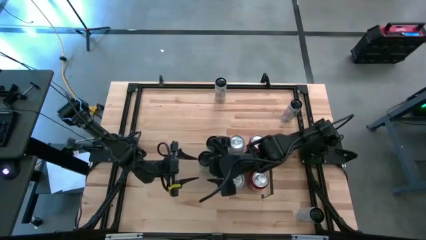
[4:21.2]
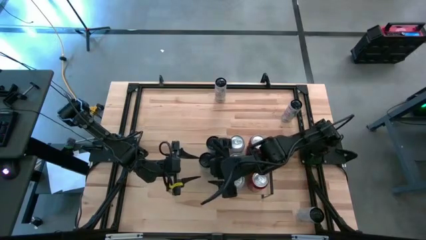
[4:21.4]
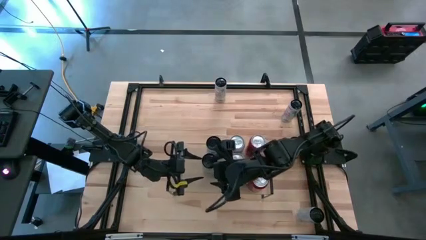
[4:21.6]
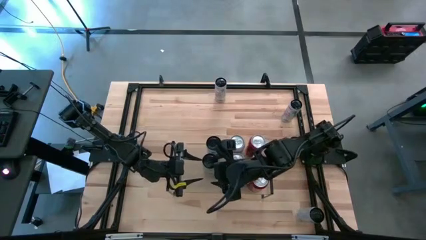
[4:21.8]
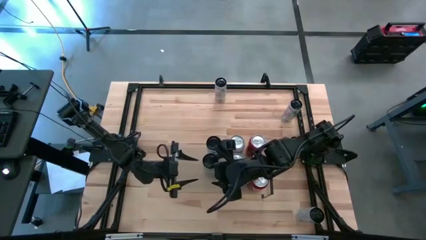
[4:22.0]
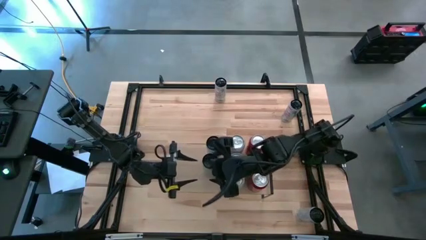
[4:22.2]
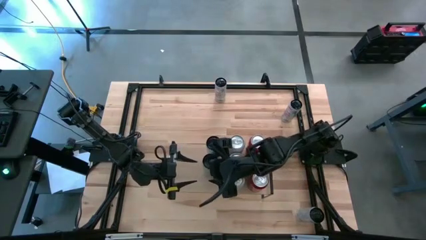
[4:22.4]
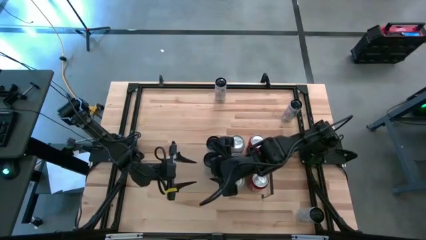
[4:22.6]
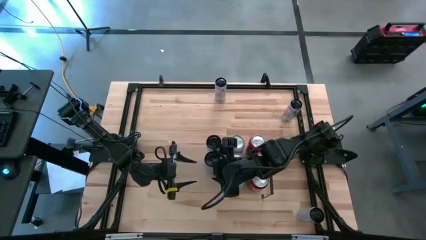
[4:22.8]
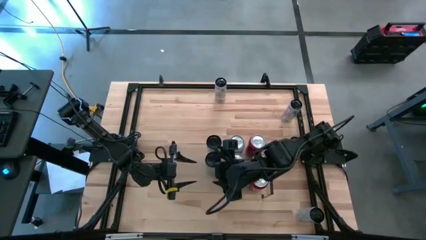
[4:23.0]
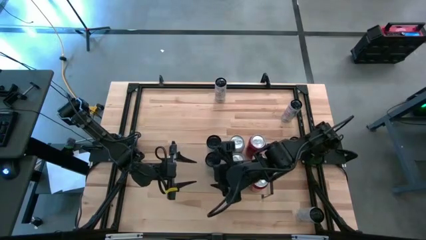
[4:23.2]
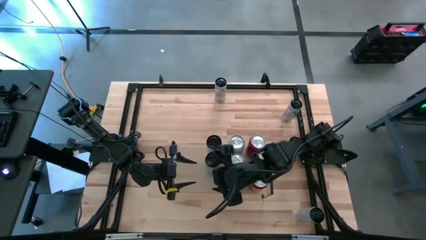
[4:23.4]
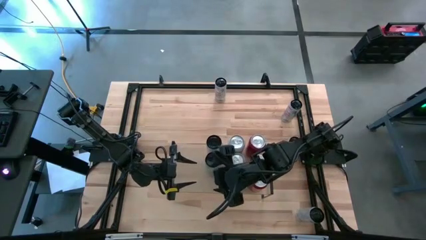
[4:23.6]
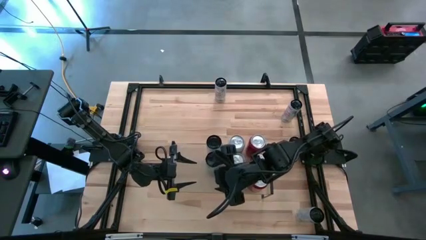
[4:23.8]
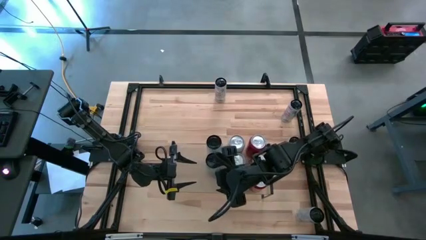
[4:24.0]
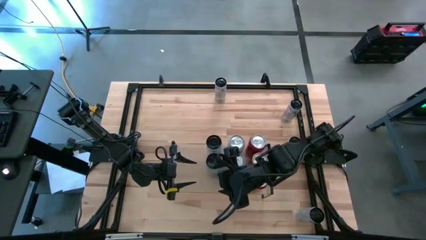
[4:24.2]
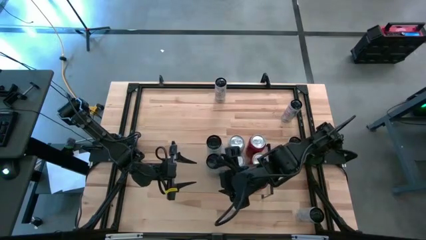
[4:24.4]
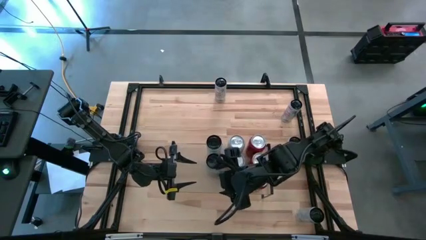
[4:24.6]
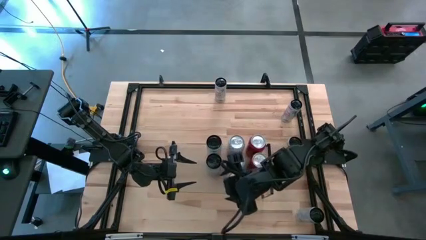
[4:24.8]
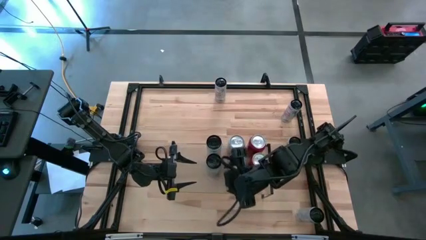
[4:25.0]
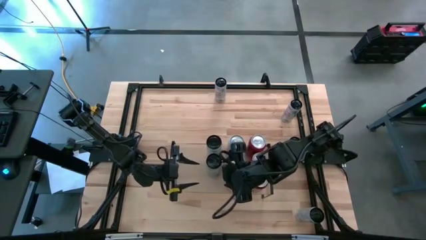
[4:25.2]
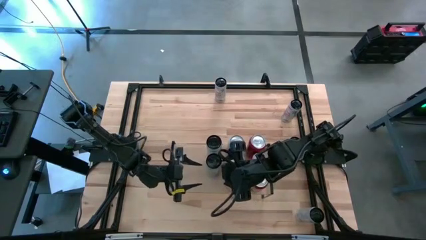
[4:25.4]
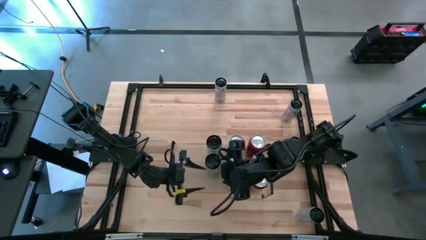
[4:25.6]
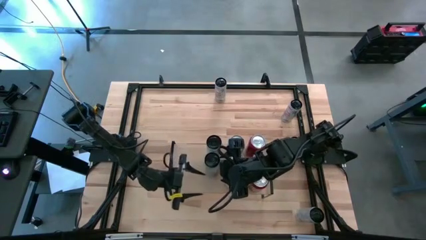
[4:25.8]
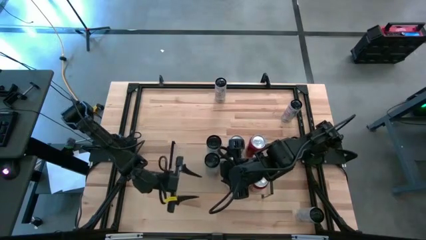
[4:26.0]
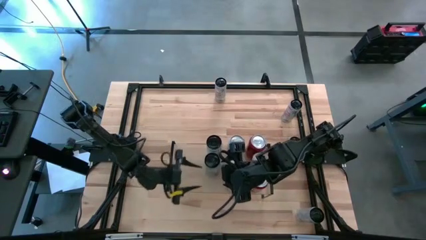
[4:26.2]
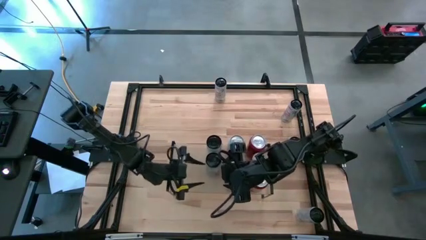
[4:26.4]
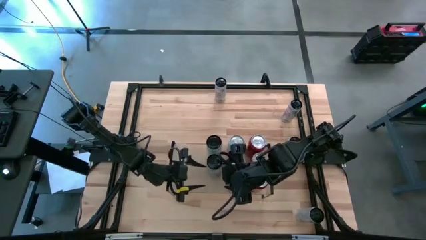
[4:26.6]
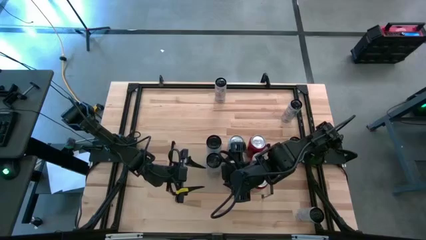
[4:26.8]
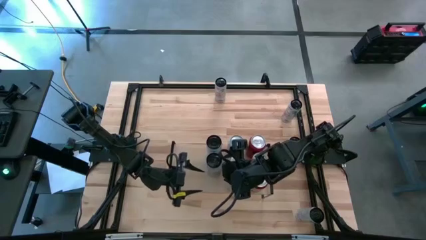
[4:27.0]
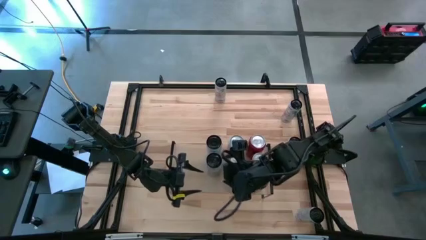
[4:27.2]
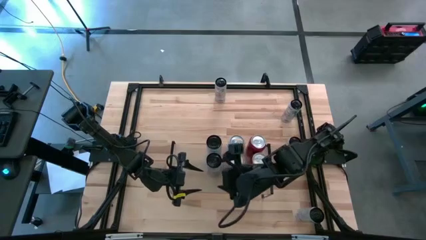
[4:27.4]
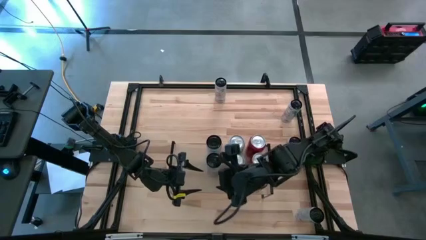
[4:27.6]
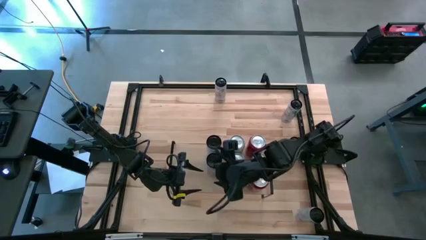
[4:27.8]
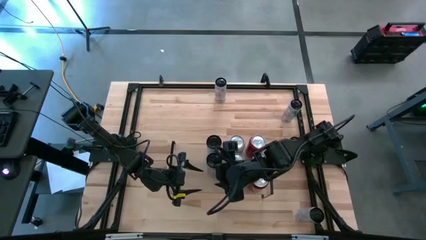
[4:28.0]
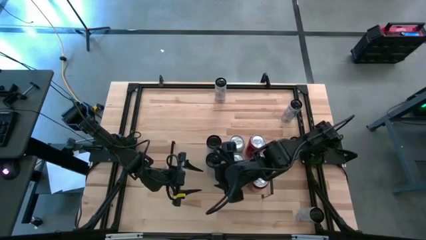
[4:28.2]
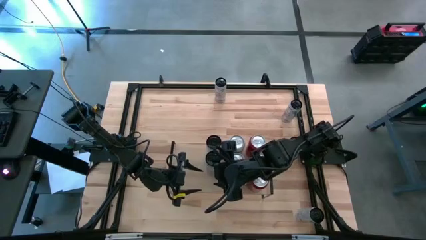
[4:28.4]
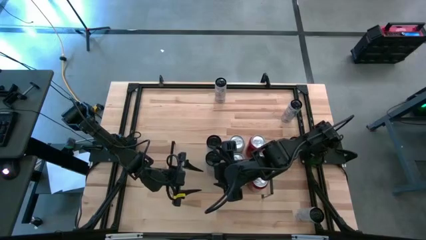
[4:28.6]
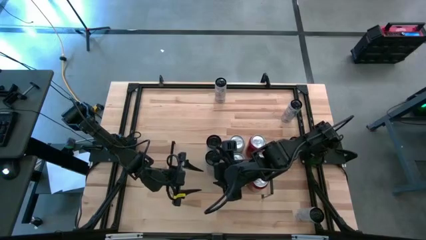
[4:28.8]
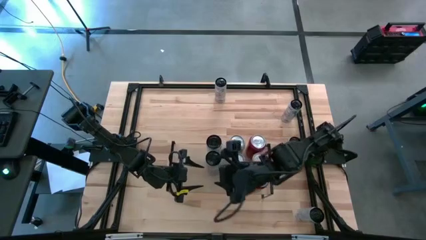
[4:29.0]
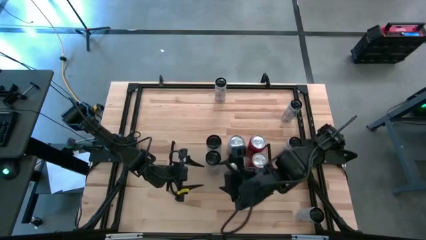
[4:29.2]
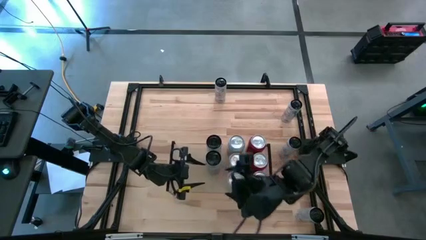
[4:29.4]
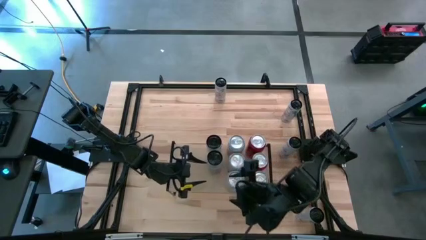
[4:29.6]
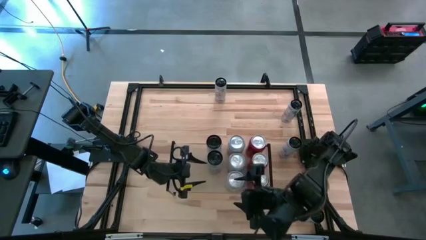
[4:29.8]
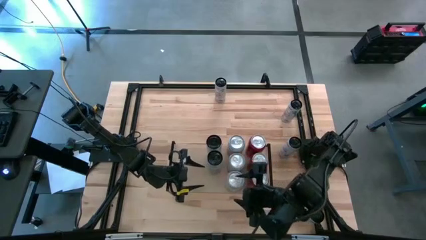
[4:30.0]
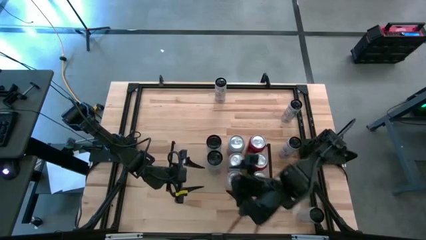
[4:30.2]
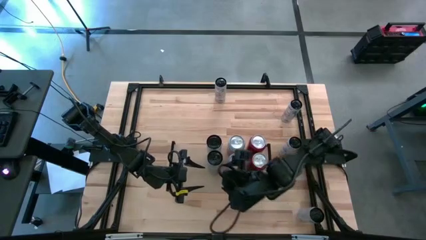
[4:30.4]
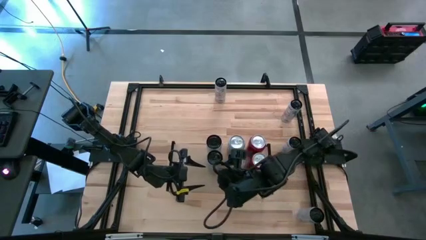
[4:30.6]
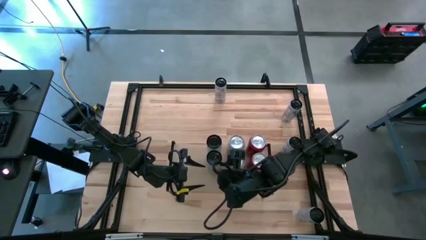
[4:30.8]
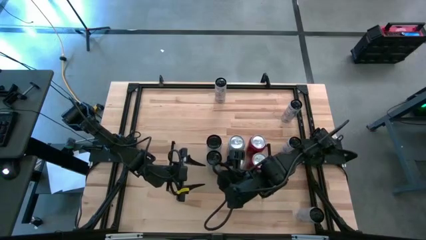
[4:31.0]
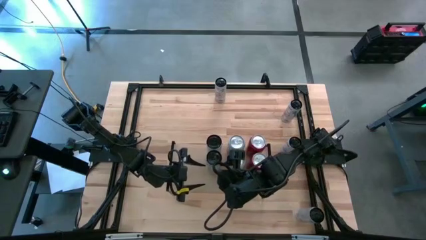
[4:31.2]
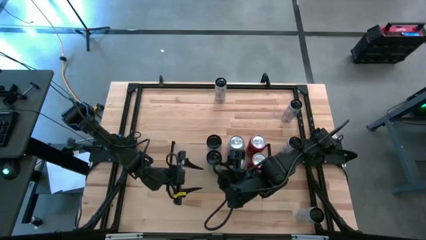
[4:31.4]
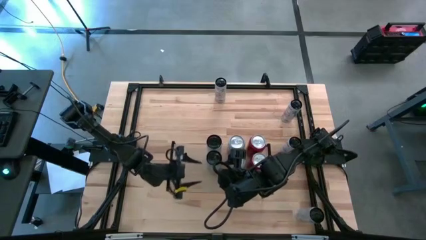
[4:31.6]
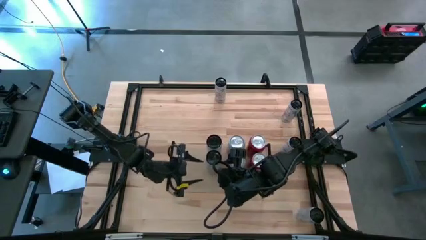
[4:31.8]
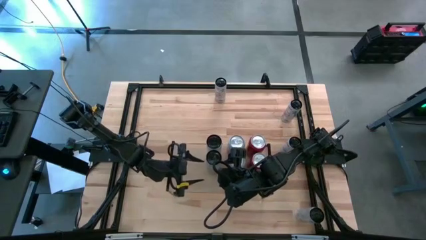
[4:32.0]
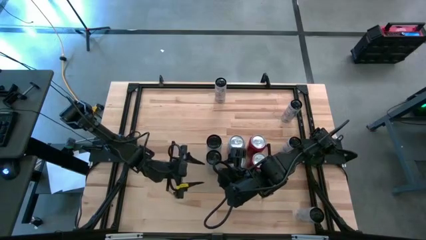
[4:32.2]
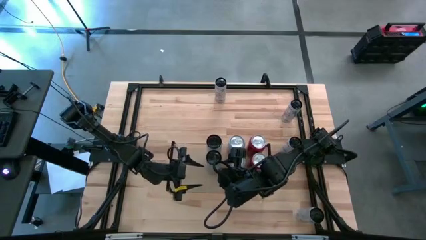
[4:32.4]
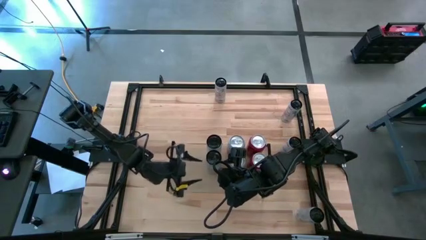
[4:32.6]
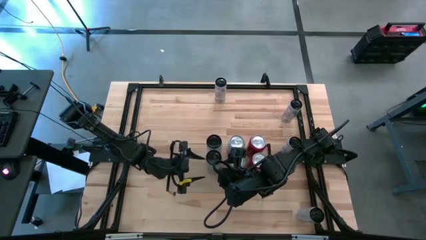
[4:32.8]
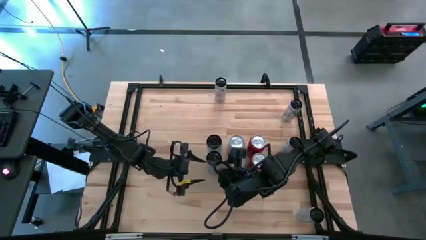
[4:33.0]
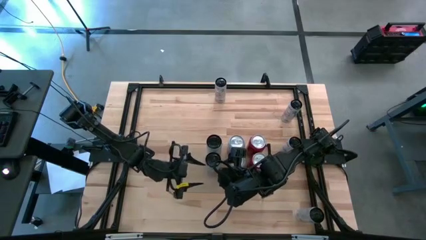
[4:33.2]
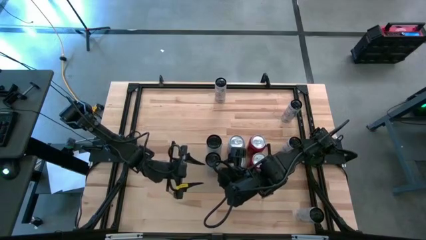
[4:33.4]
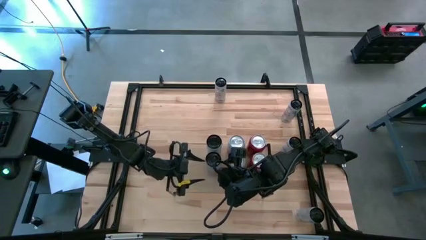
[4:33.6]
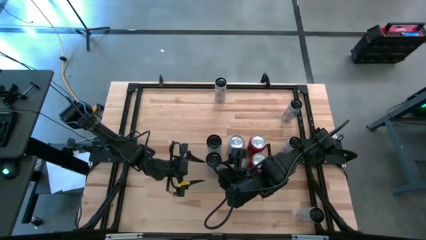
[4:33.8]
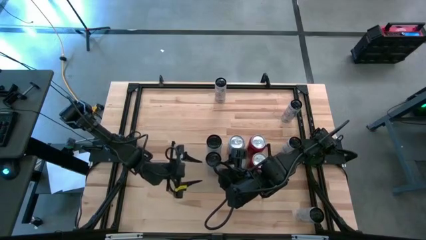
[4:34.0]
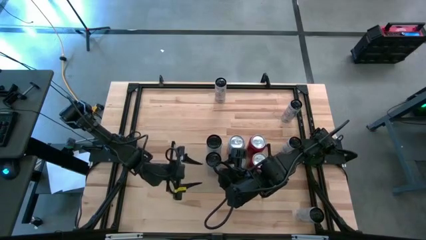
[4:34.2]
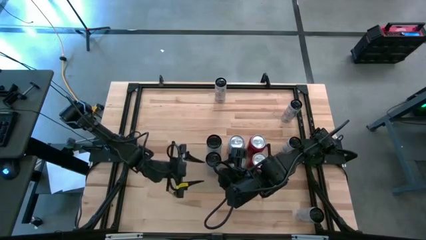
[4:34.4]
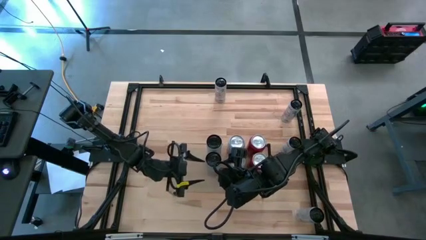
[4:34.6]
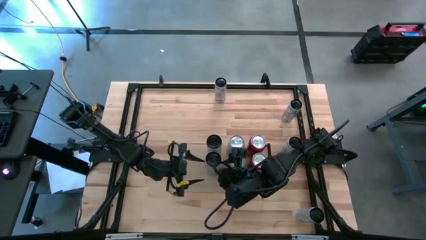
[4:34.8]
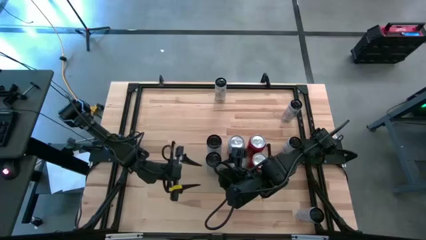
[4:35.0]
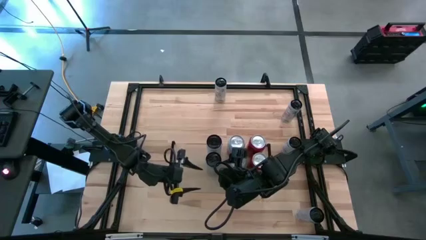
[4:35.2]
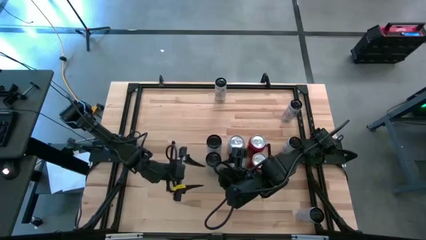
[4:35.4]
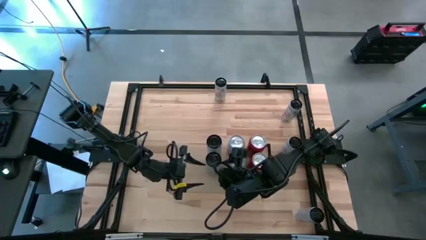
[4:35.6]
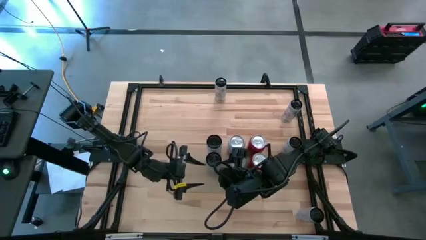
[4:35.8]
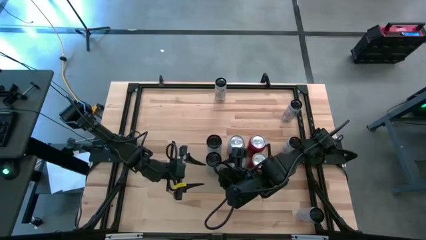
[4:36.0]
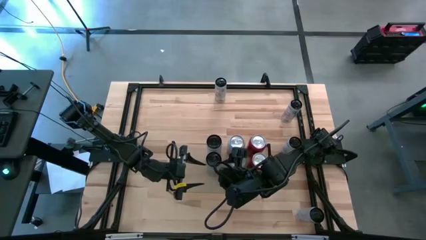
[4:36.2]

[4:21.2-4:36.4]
Task: Place canned beverage on shelf
Put the bottom white-blue soda can on the shelf aligned with the other white-blue soda cans
